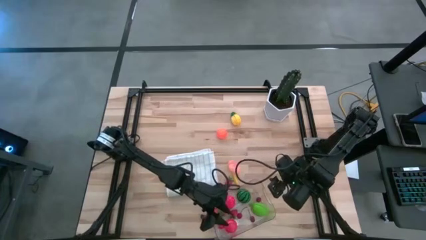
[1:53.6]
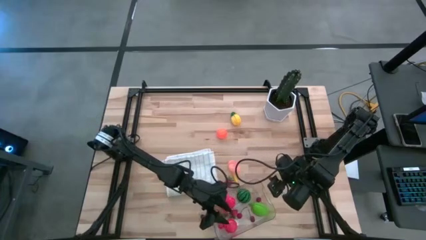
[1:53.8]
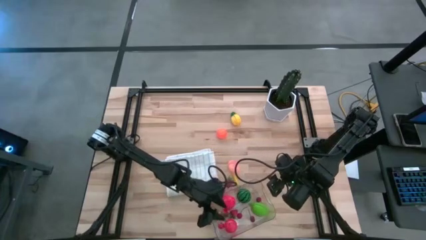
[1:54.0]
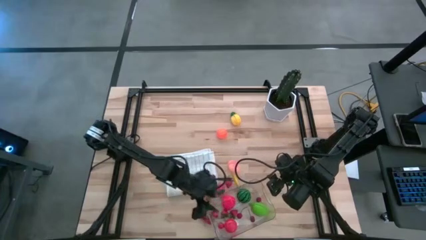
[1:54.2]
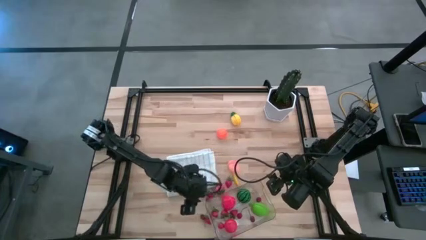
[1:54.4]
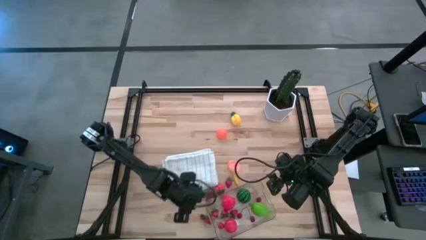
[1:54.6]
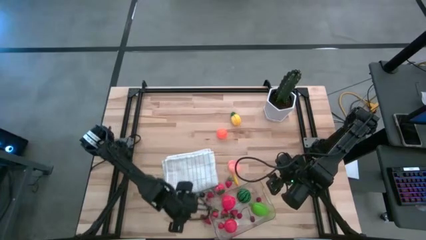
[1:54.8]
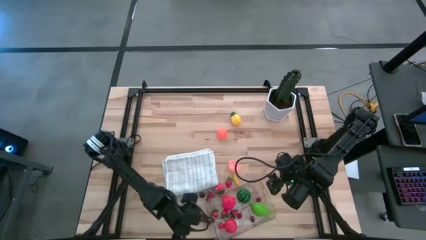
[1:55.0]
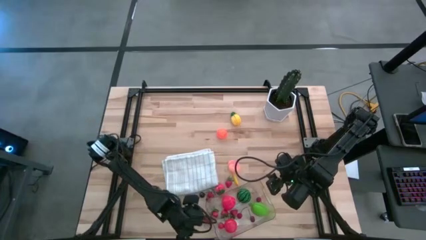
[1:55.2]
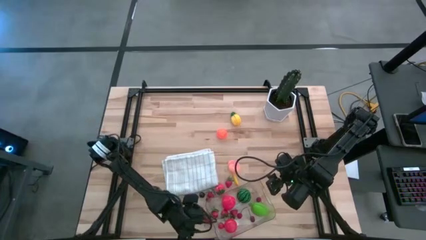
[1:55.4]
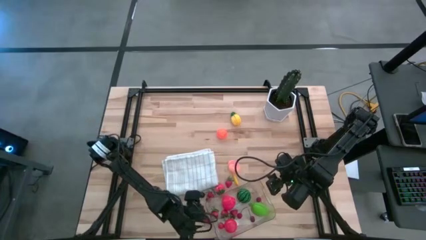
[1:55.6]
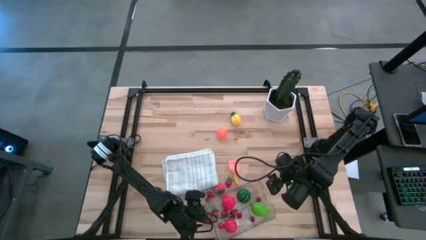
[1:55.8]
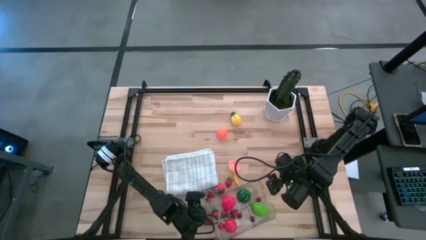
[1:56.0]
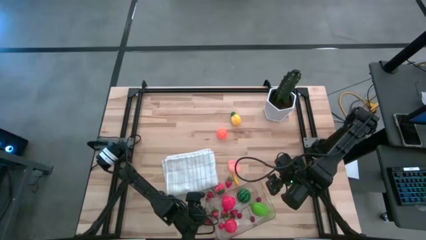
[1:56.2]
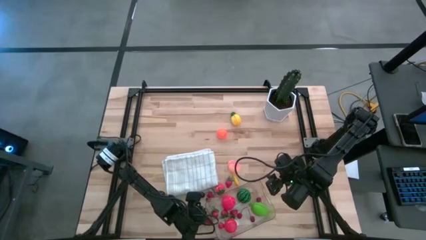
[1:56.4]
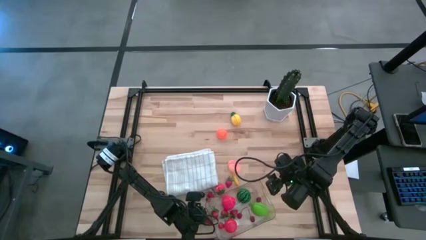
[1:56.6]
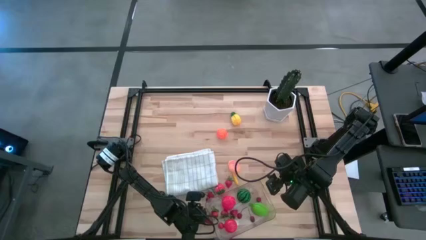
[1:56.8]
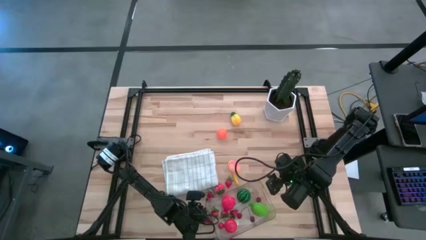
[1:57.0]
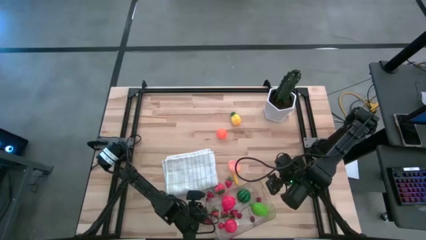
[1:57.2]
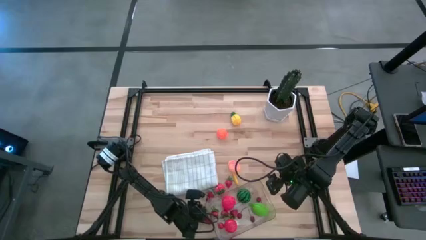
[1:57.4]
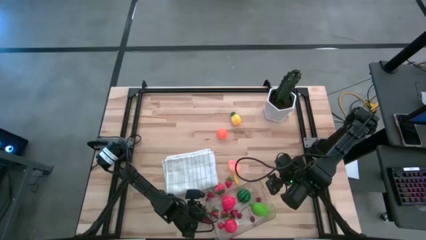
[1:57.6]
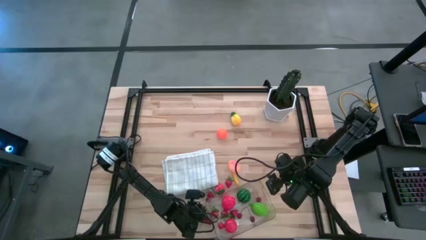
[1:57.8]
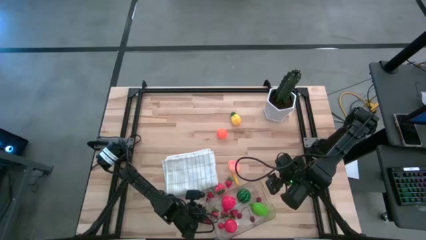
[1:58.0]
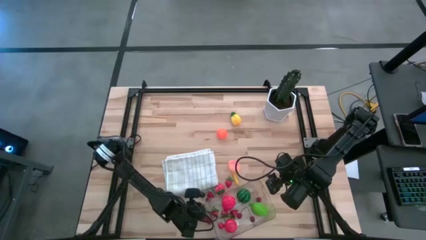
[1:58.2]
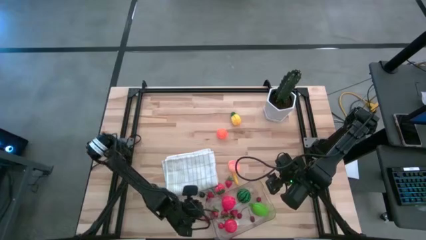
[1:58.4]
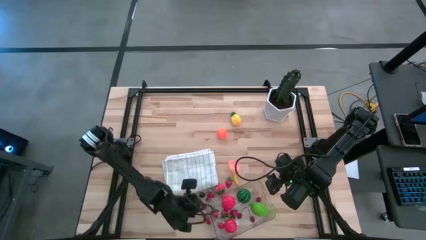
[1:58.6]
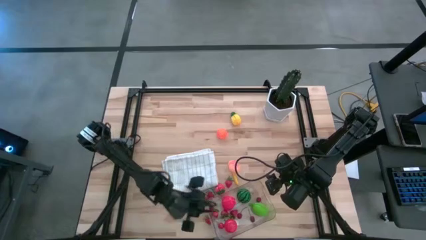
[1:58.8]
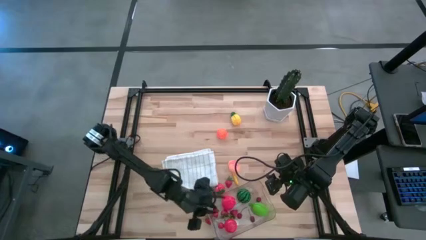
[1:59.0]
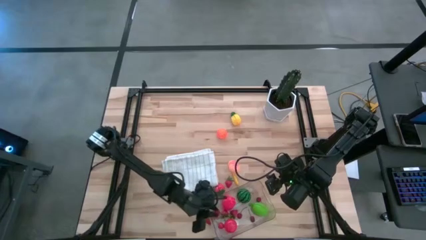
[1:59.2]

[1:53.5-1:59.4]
Task: Pick and placing Produce into tupperware
Put the red cherry into the transparent bin

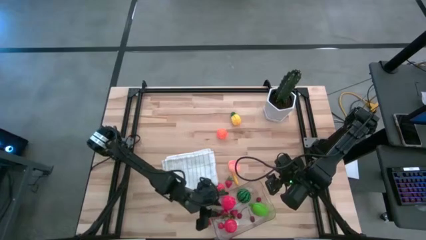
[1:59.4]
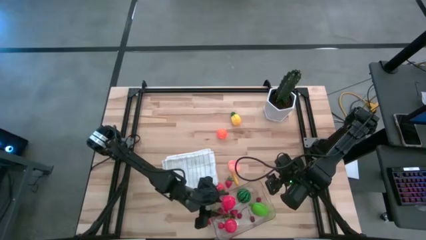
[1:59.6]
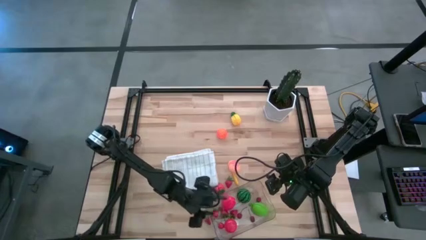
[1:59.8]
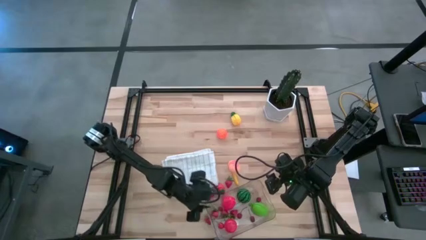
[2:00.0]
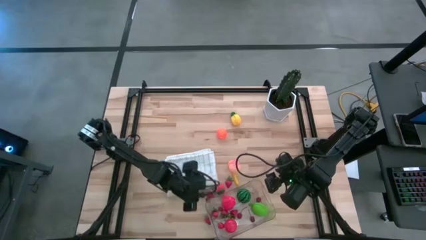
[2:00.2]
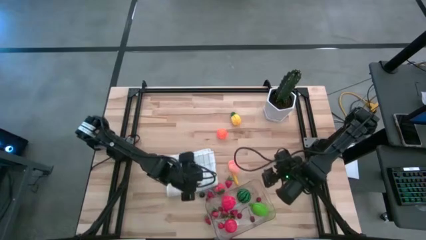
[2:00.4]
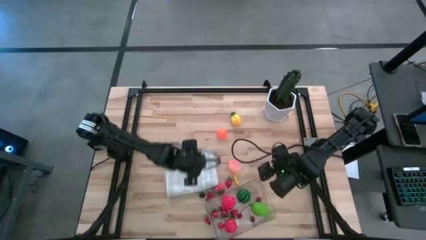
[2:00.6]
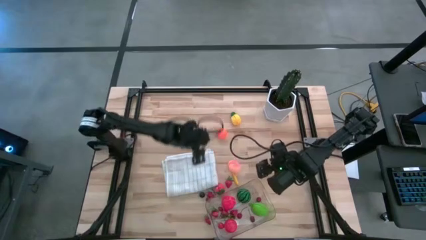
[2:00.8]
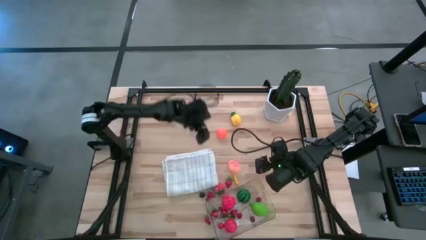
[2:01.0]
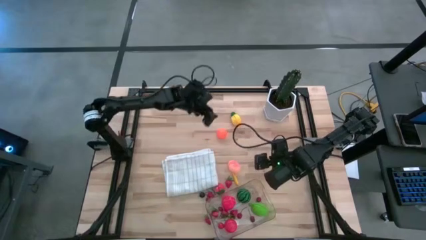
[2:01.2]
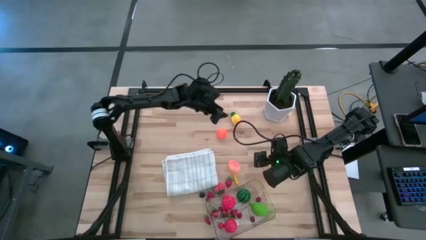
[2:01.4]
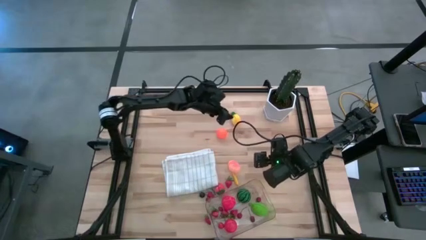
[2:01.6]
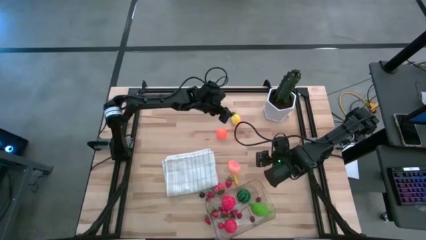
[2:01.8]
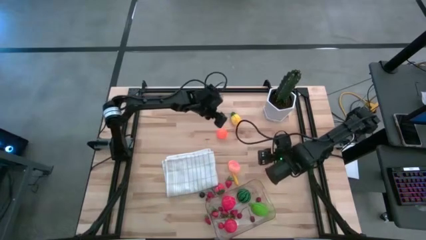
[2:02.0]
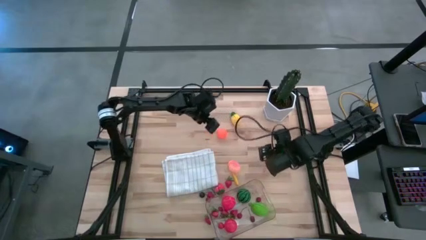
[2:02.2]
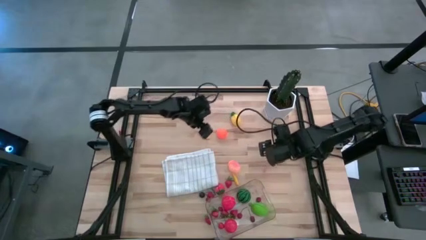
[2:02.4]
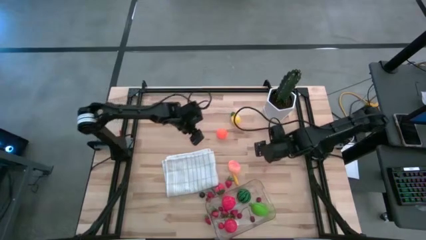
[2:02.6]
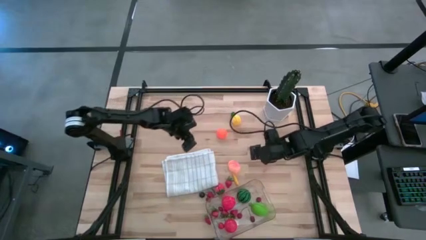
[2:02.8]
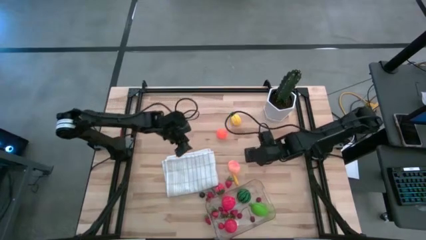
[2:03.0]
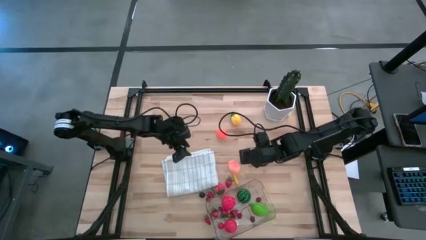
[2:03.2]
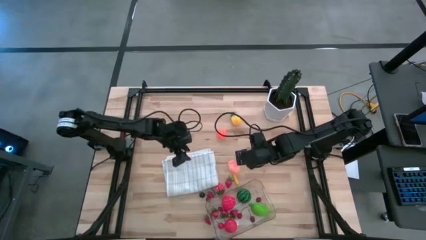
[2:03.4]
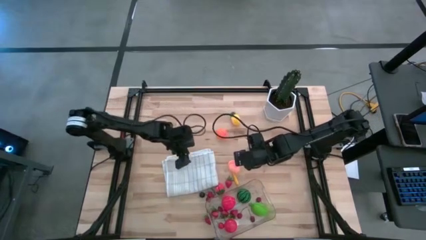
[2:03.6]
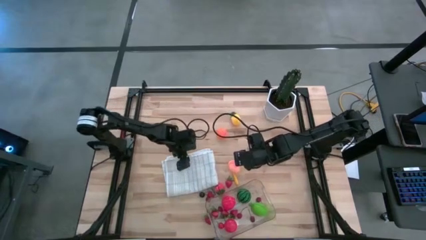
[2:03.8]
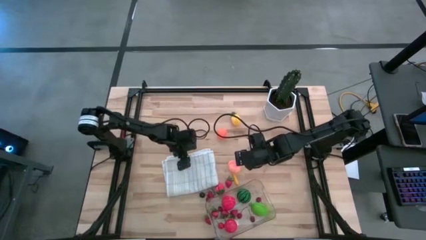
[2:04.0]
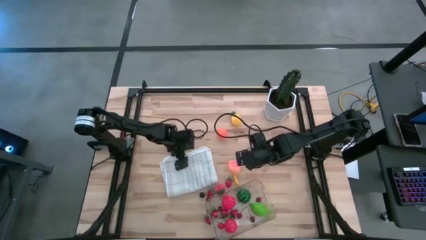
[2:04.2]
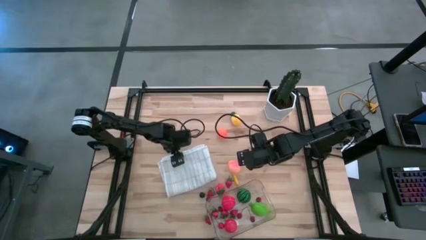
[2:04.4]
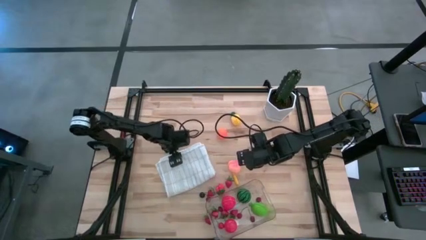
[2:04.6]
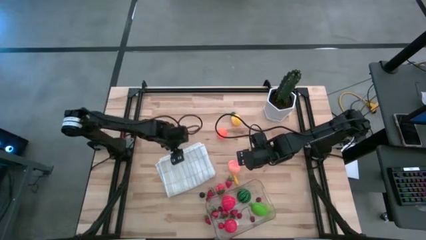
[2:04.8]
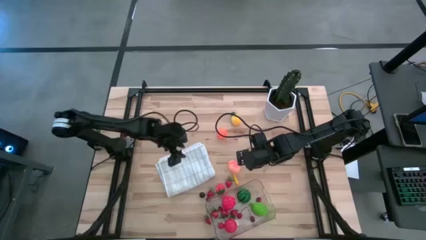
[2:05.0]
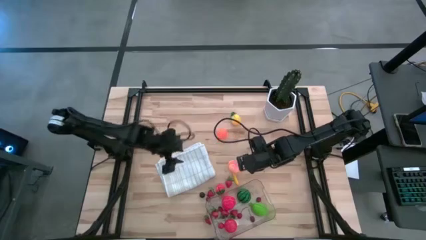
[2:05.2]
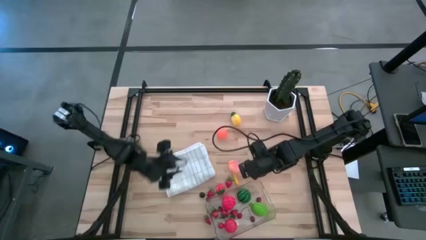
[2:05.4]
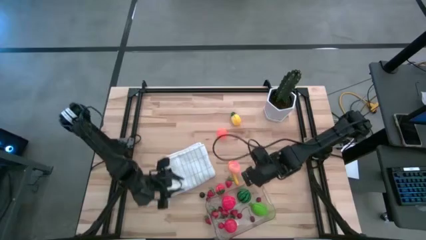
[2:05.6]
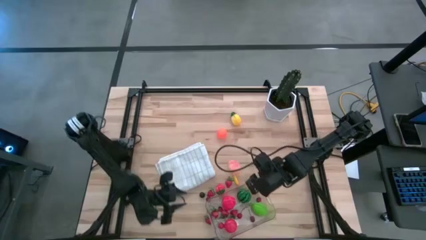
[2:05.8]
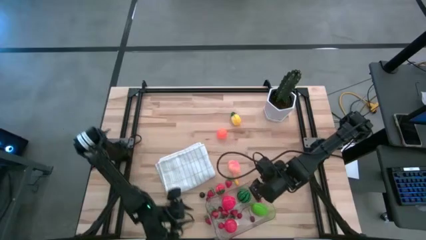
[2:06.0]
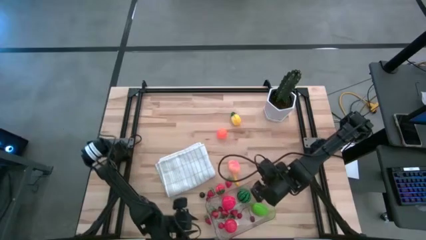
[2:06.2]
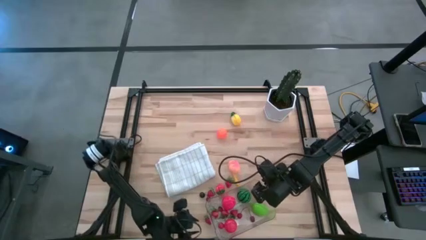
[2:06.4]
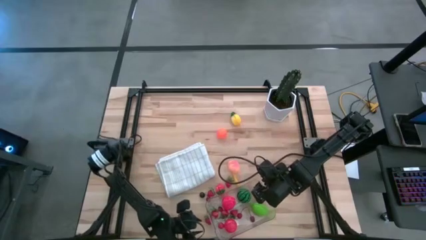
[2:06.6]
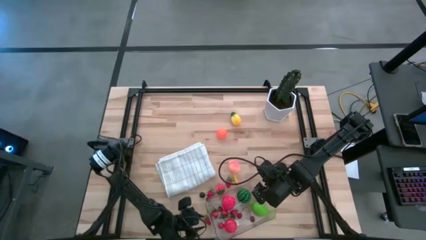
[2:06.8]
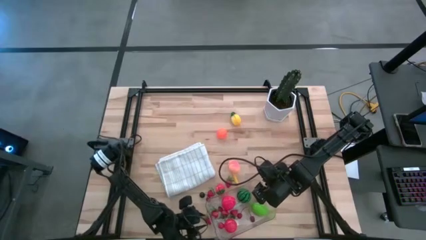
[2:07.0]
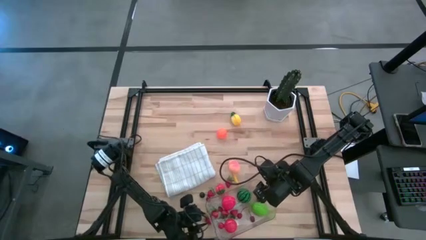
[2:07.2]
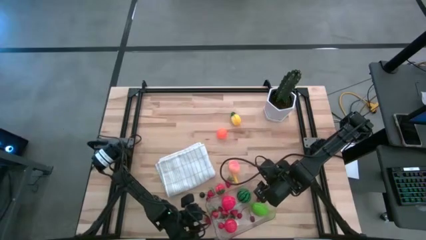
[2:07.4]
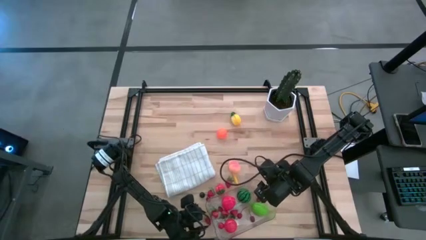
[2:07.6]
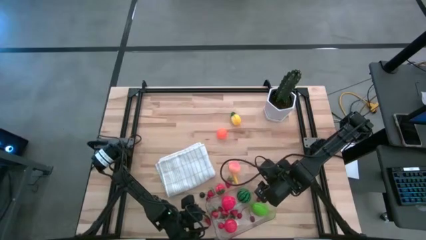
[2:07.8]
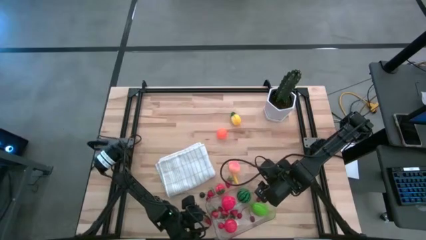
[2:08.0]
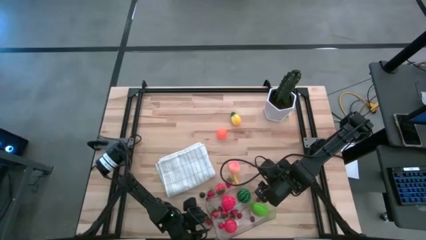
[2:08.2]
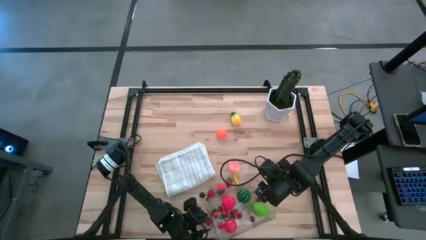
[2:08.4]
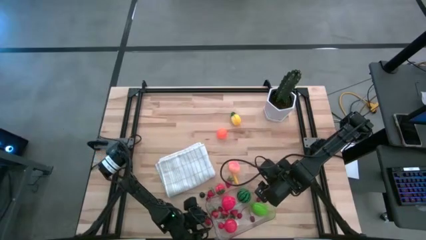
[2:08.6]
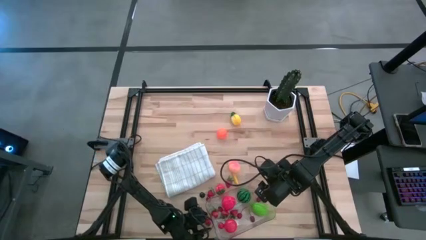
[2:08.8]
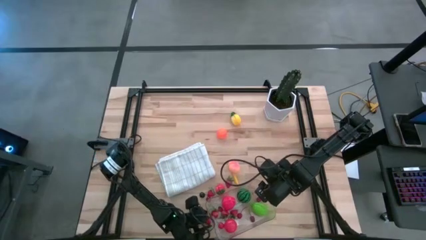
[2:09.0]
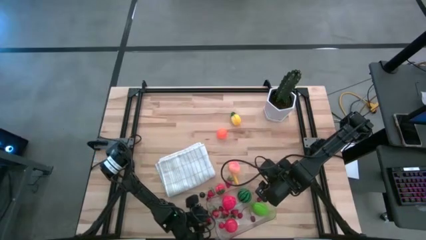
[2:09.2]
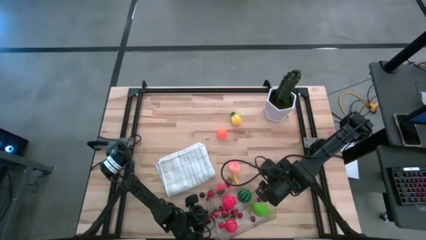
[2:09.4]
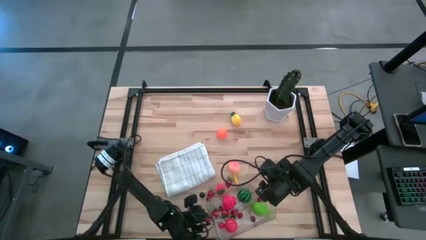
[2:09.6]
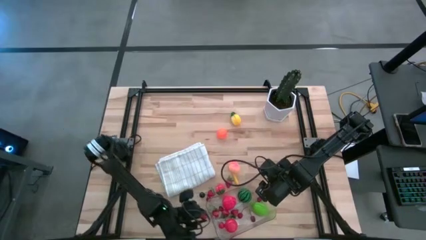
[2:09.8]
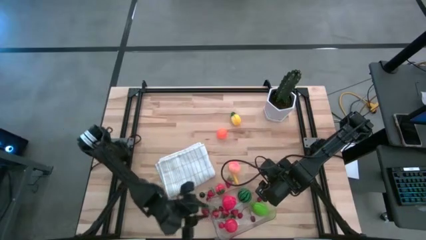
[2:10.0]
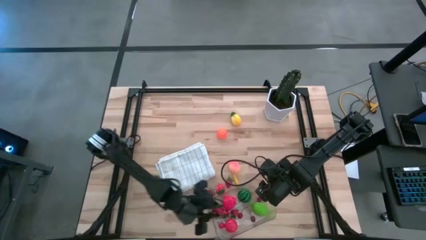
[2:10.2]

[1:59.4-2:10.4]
Put the strawberry into the transparent bin
